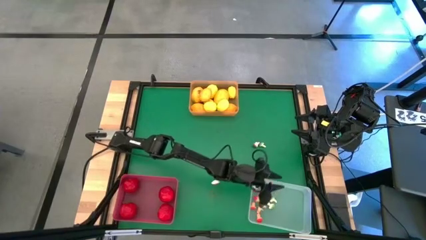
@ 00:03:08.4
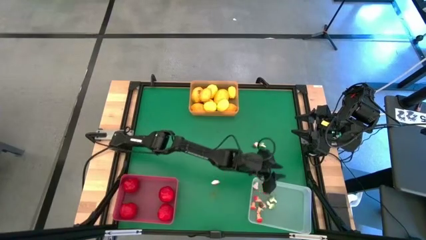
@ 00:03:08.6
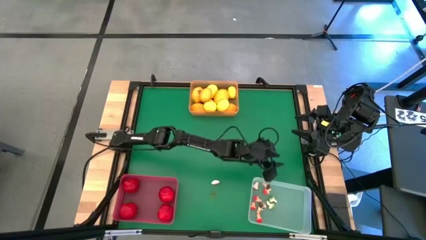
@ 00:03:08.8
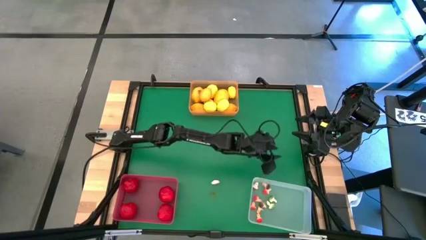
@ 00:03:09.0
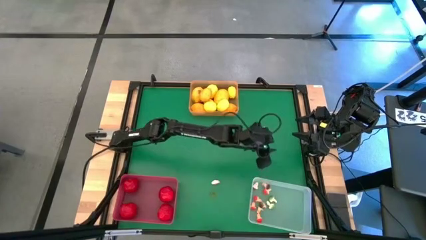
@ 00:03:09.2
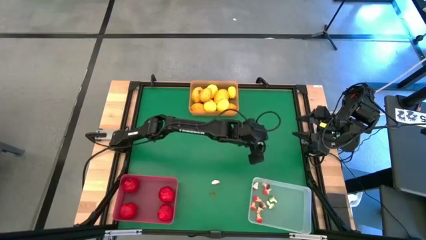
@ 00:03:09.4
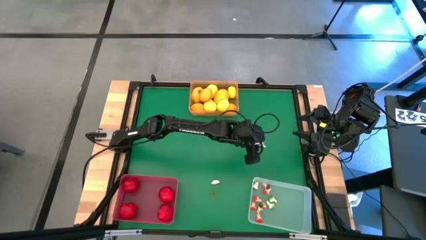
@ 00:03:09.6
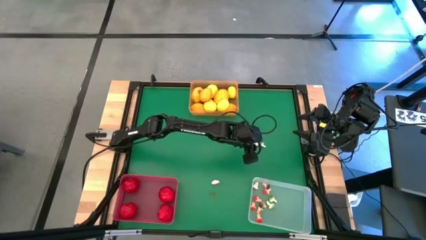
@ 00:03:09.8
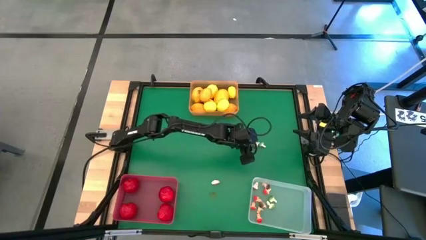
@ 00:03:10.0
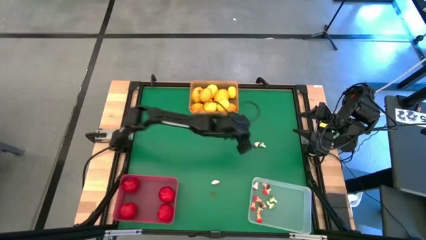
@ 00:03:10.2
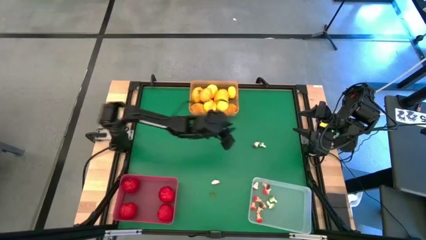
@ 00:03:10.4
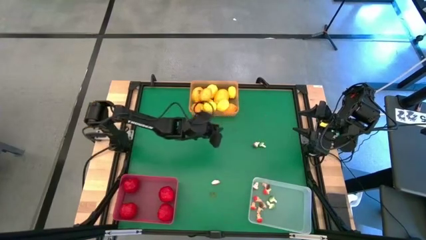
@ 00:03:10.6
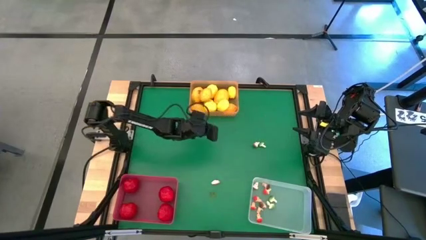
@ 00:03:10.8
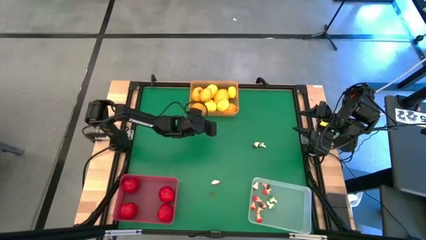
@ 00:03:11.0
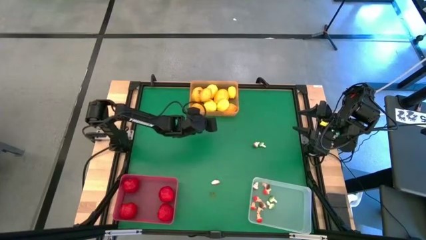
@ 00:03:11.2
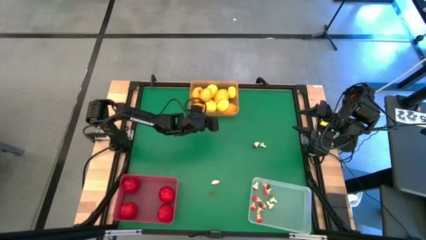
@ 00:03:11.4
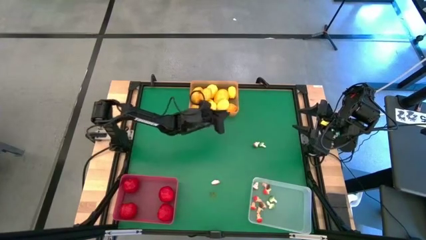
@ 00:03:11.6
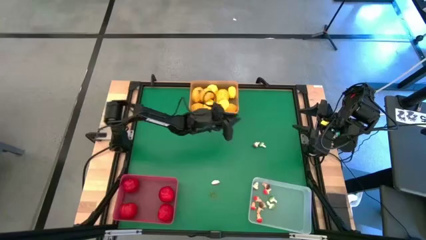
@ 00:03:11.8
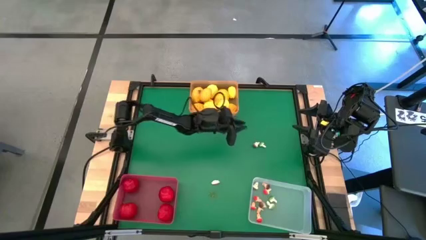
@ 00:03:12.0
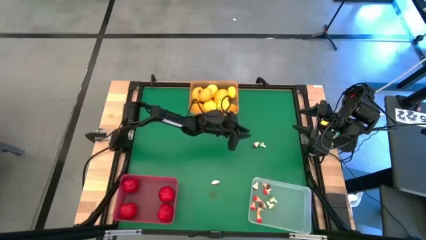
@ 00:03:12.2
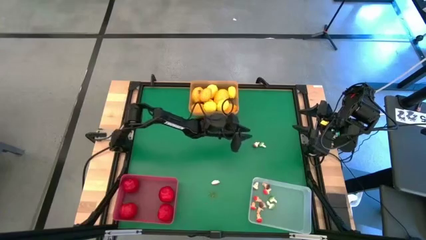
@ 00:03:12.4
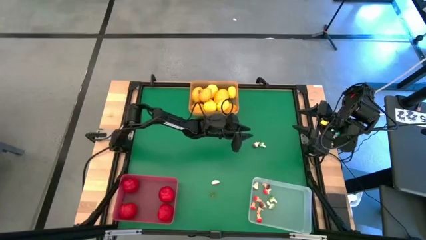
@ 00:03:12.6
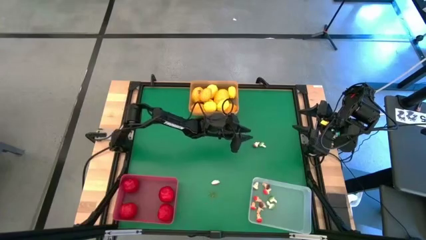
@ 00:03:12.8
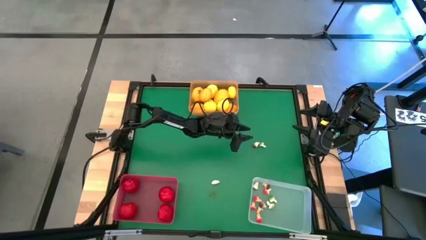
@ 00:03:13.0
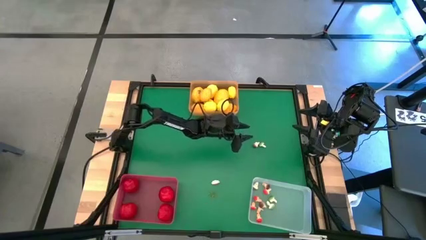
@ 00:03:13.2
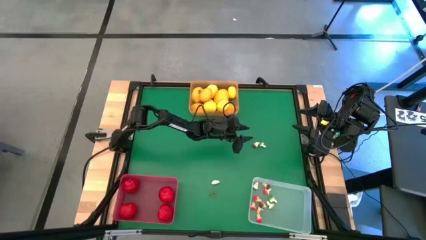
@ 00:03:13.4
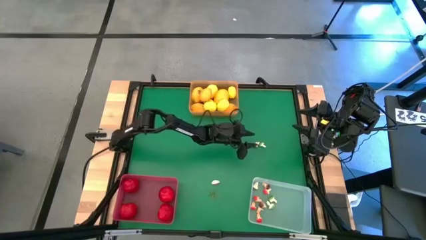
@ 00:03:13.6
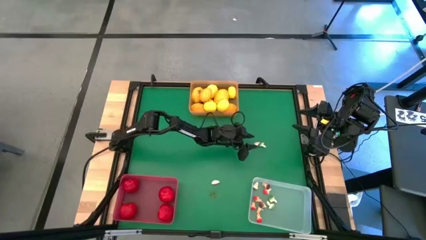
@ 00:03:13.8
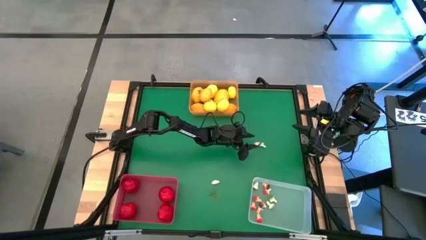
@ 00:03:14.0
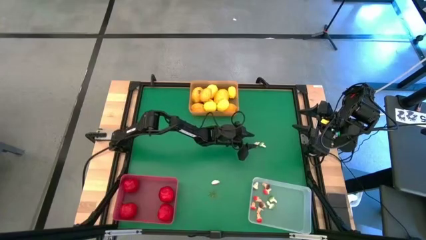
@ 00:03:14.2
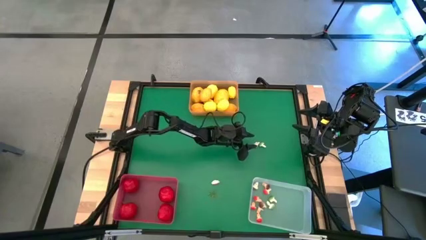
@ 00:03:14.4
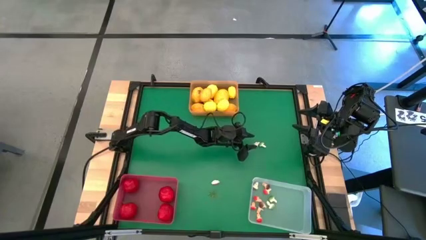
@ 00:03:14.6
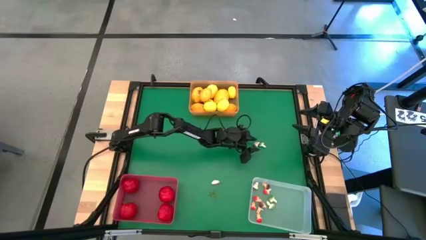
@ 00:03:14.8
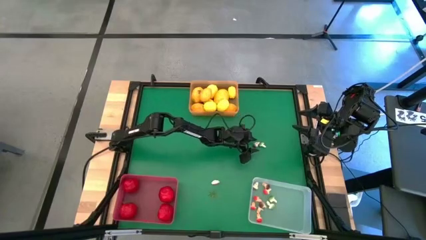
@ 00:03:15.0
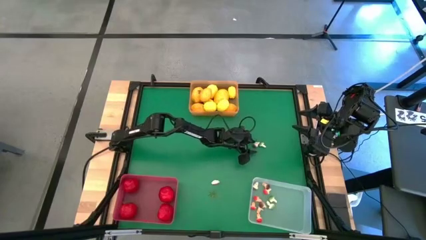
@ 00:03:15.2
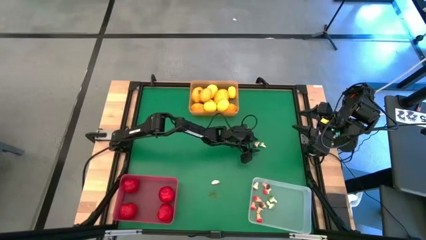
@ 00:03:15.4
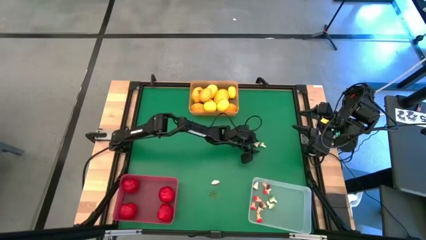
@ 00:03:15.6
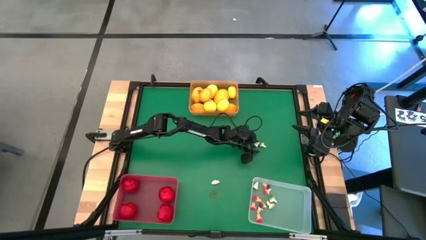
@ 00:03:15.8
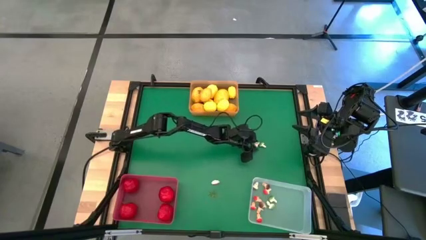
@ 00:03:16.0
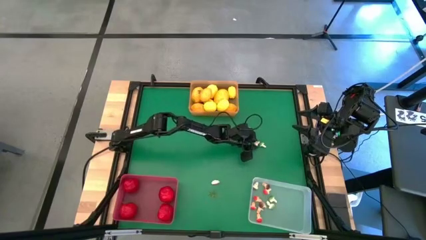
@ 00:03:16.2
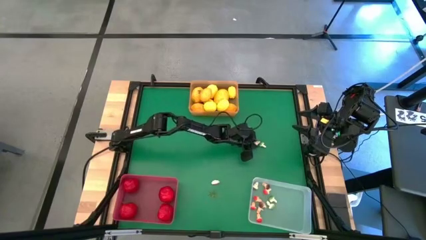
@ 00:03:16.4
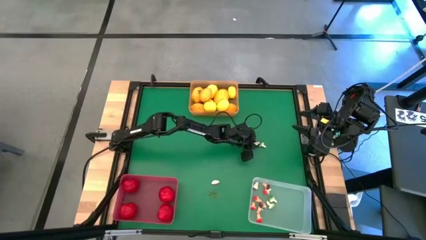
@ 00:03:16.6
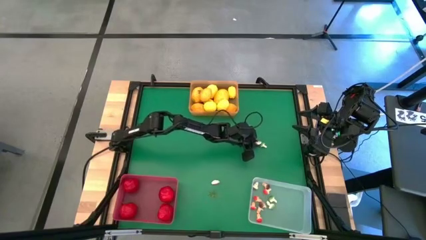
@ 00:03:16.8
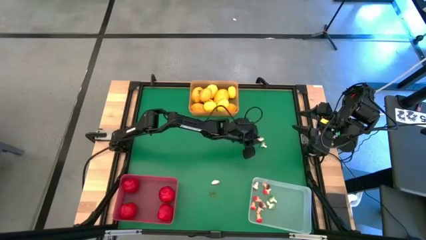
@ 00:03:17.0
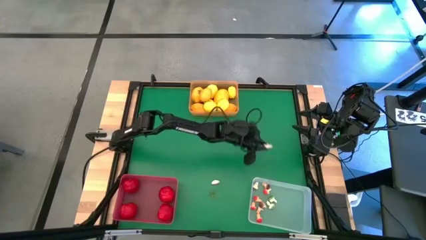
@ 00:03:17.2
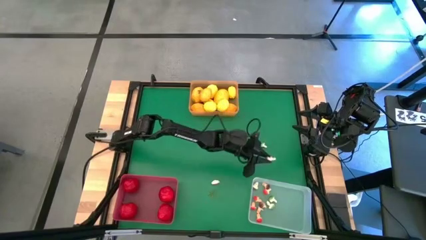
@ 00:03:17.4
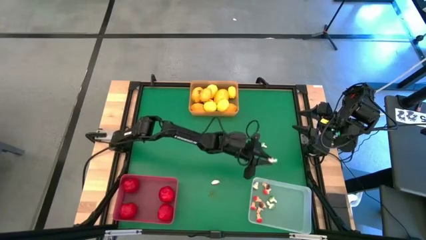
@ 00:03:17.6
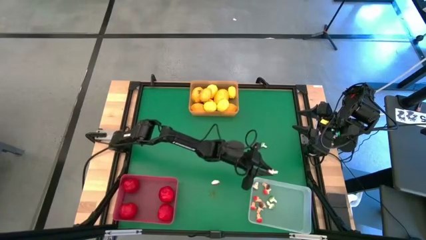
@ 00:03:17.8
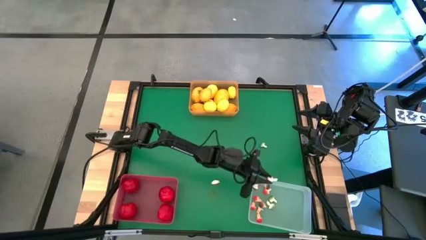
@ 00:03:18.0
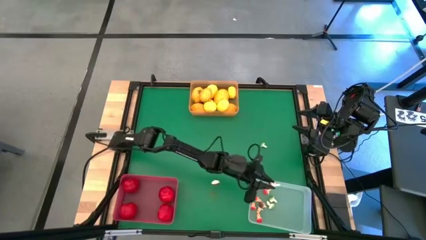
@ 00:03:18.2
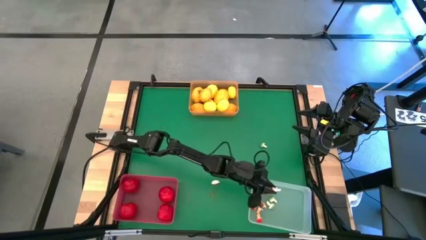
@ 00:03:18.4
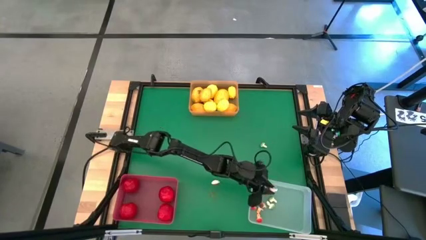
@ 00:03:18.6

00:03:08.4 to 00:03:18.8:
Task: Sort produce into baskets
Put the brown mushroom into the transparent bin

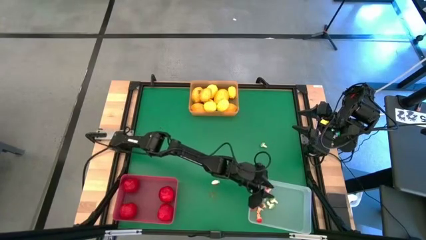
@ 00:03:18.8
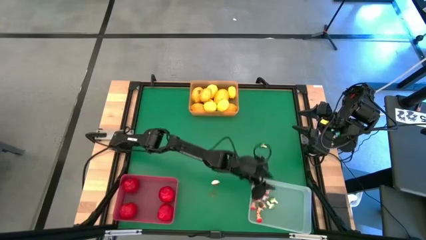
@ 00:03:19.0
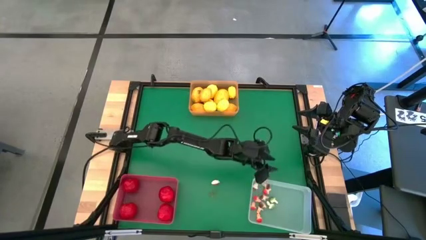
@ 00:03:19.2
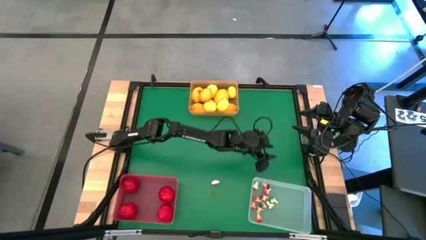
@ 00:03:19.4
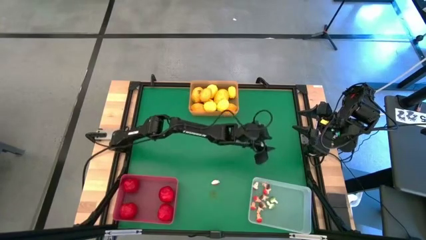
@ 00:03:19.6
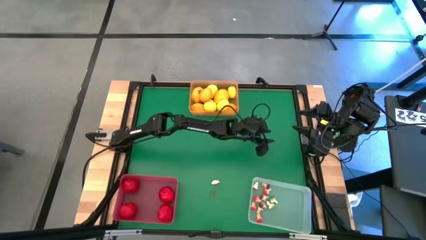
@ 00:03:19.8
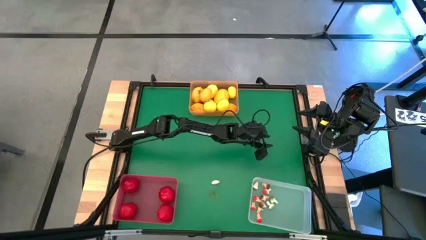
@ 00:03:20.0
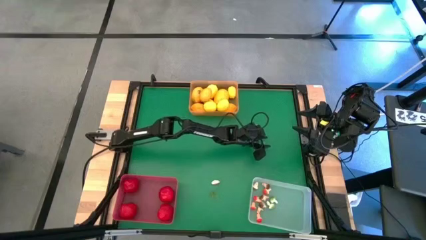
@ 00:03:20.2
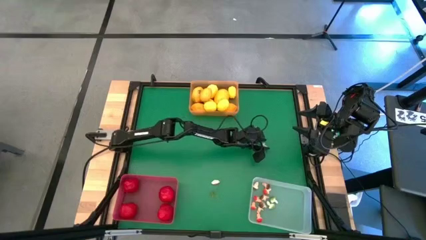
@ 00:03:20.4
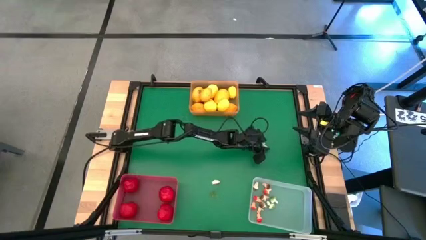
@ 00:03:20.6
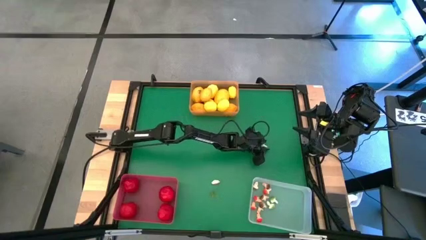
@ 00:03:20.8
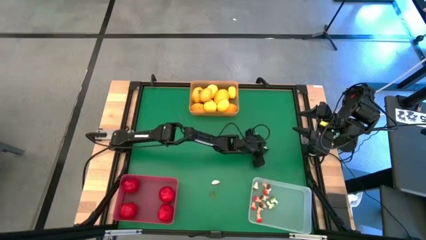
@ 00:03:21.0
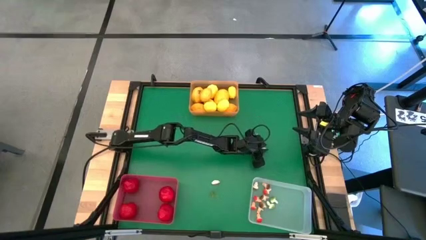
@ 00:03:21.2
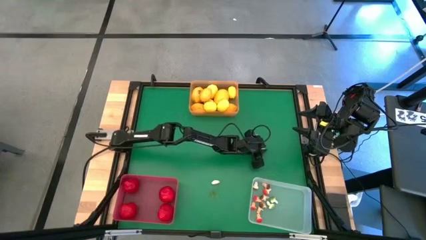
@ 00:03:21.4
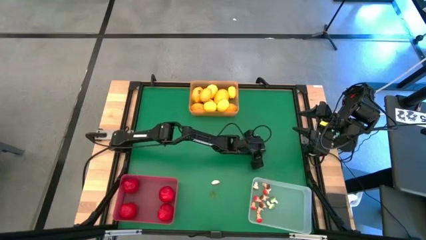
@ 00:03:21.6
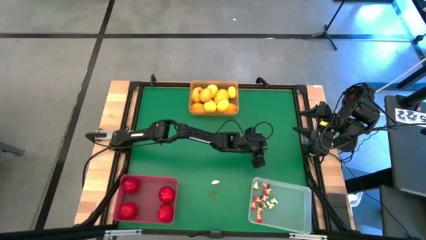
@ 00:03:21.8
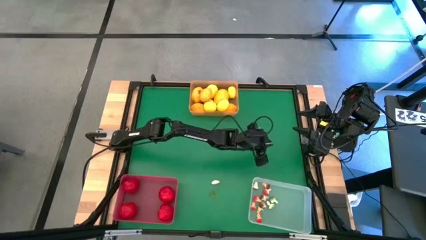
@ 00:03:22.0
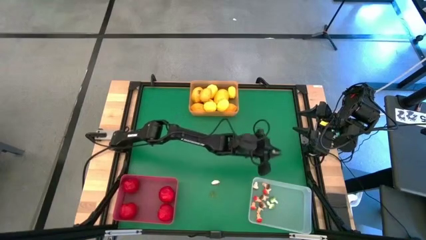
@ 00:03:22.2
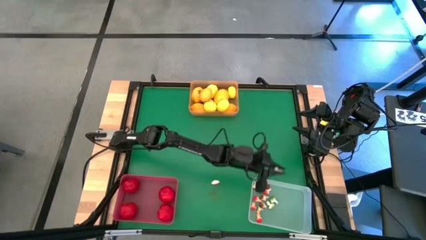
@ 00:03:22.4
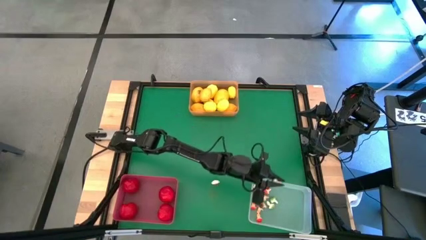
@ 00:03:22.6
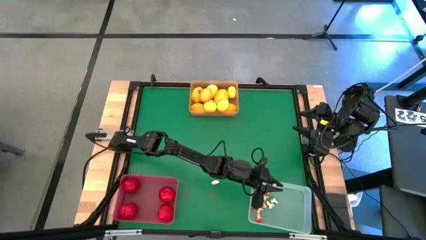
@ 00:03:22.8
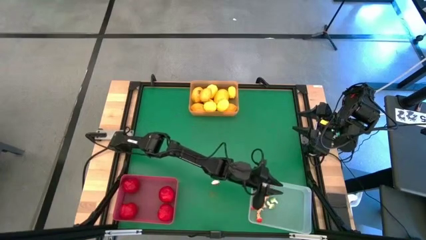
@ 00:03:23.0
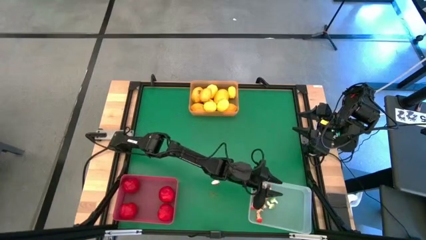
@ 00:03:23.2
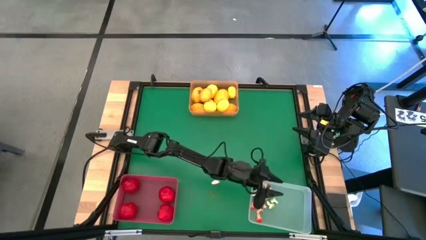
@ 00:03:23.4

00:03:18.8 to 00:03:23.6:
Put the green mushroom into the white bin
